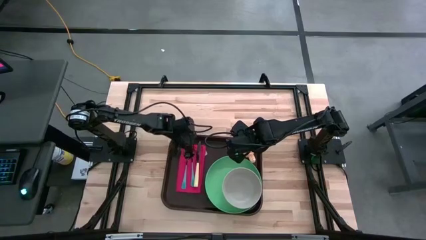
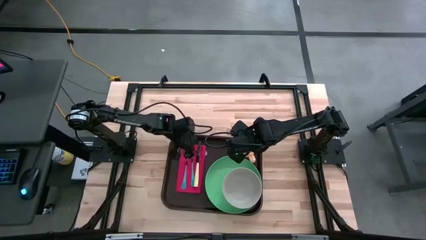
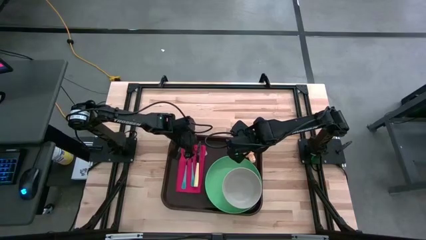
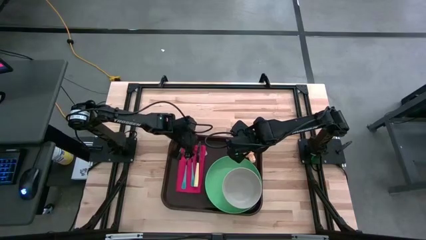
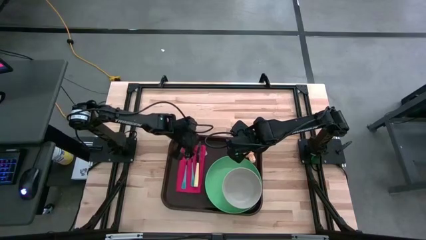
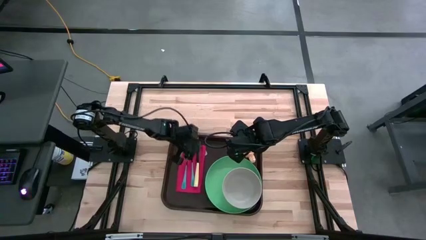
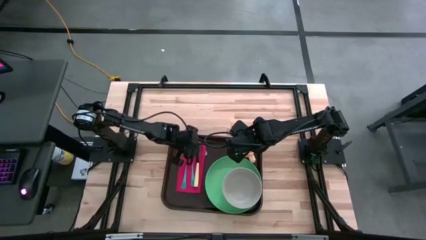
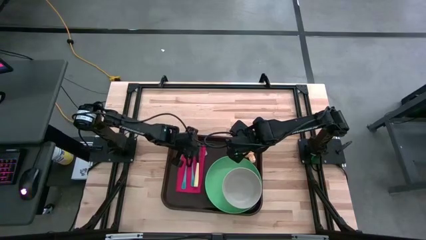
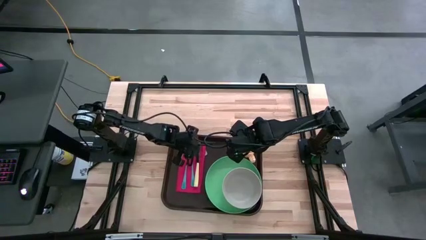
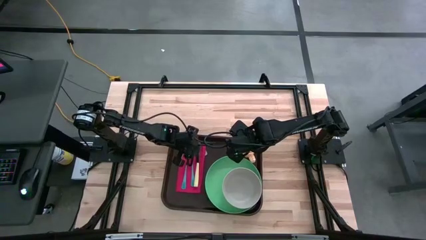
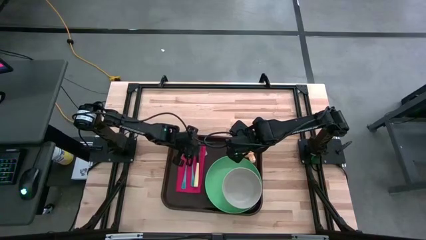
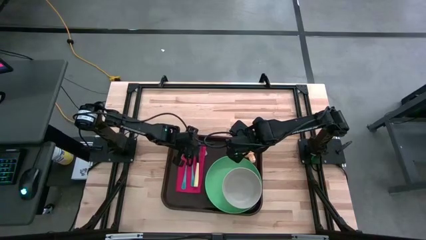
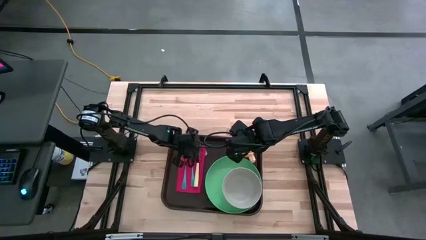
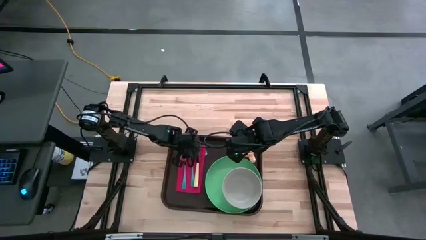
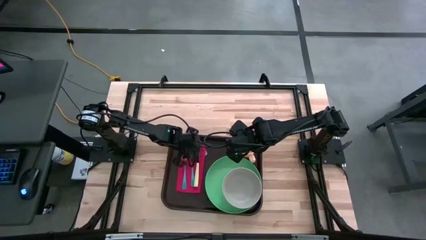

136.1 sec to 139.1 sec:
Task: Set up tray
Adjust the blue spoon on the red napkin on the brown serving tray

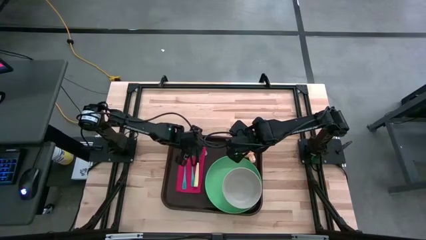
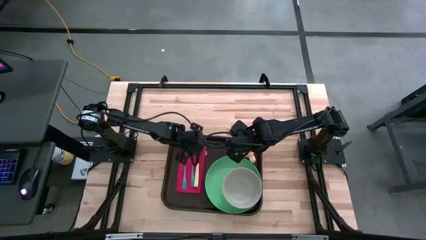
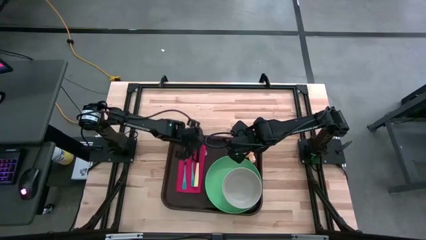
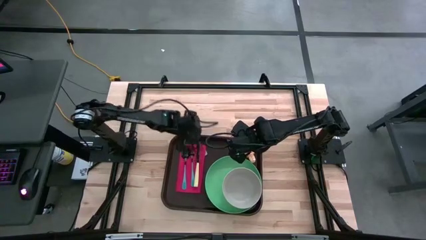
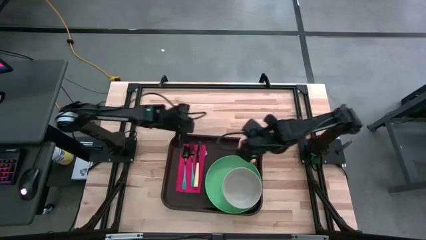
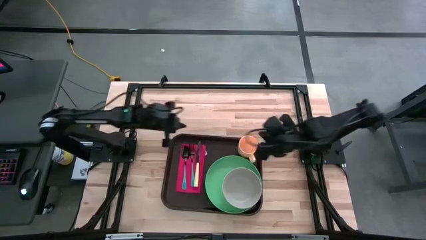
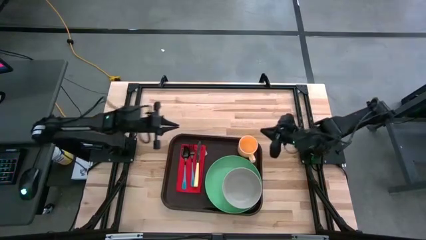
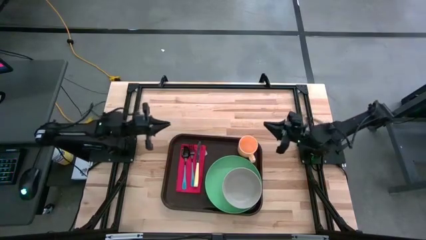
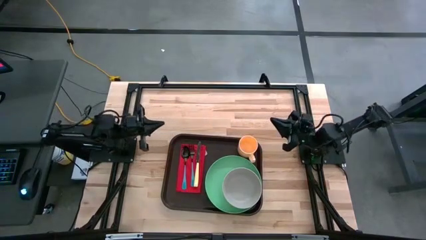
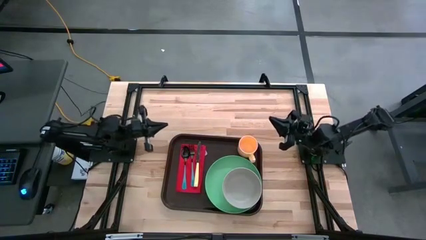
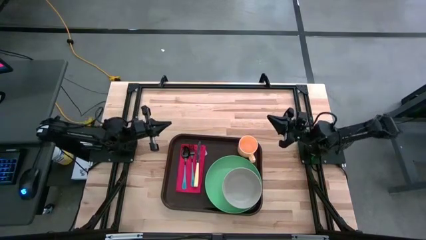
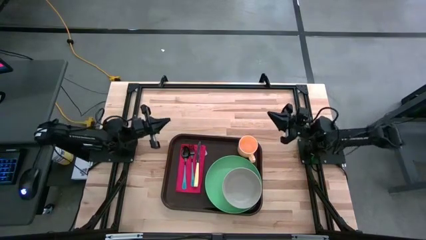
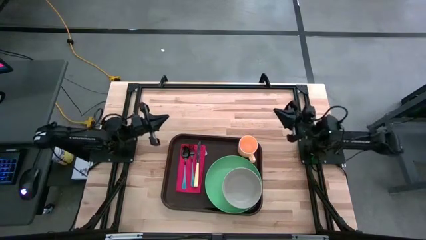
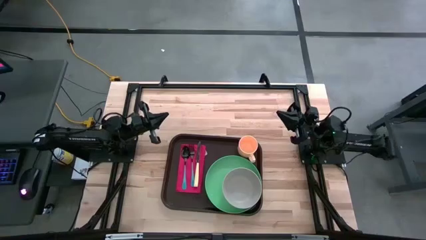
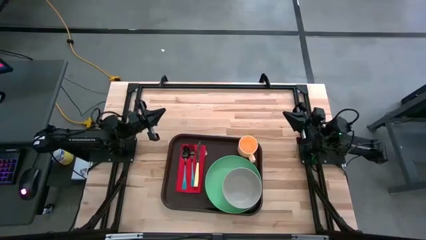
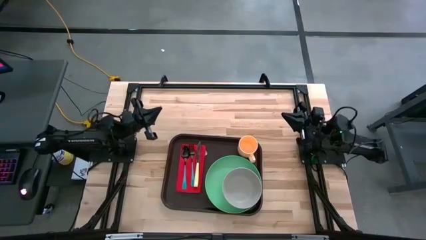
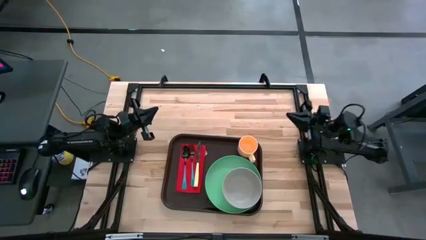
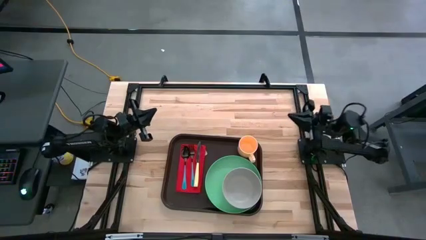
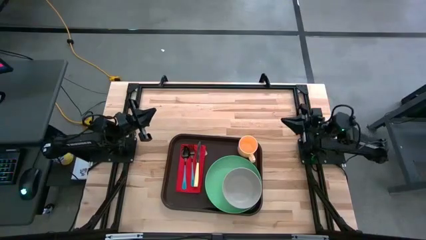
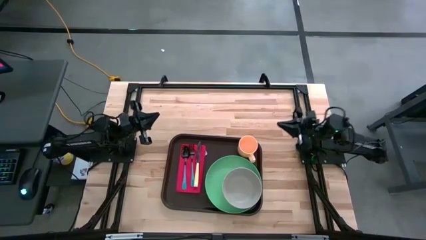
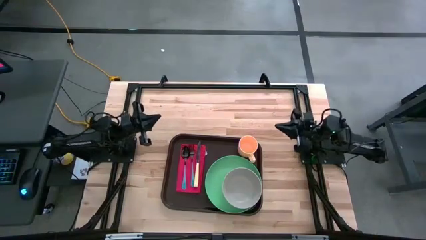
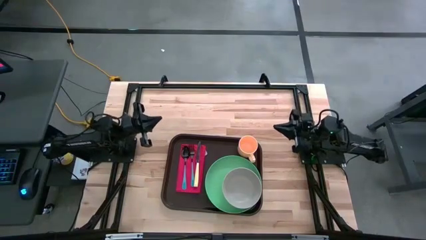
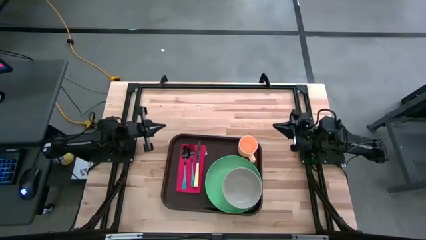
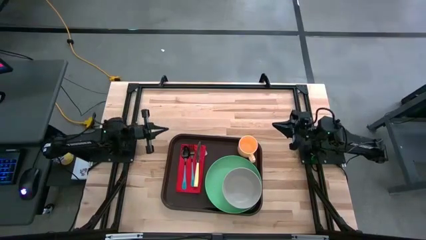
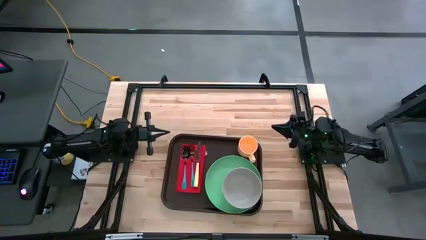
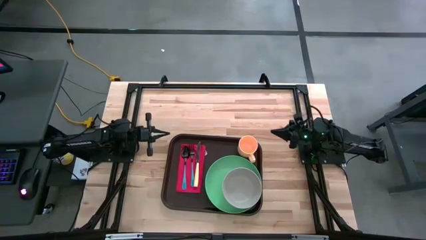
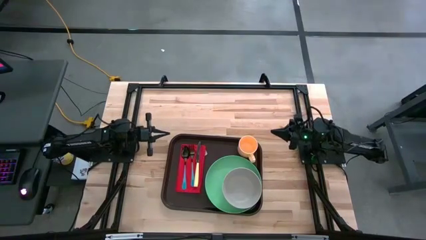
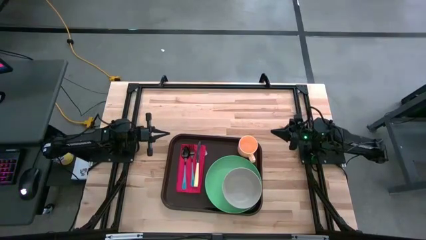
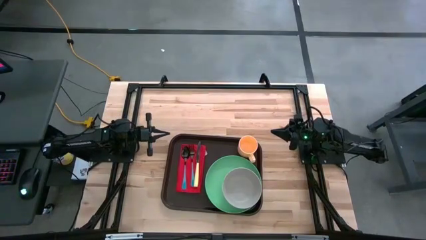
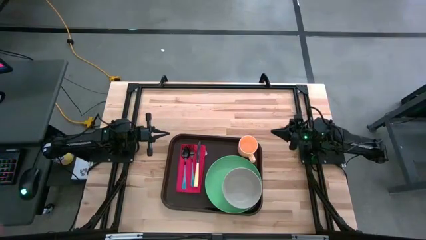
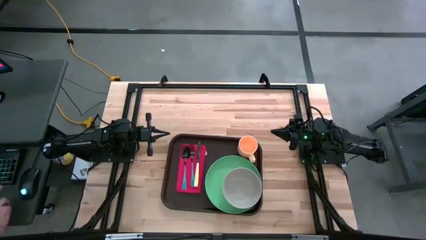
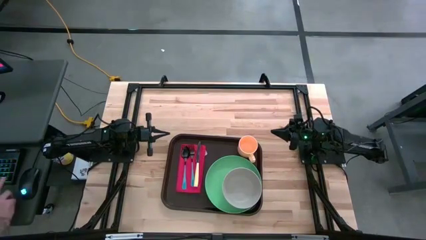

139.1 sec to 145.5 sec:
Return to Home Position

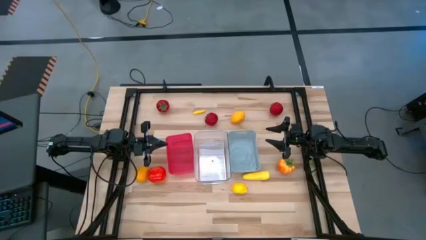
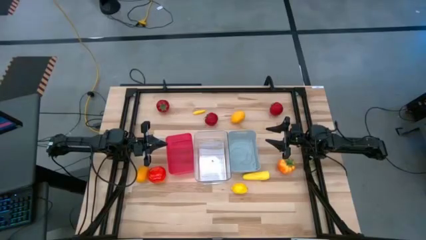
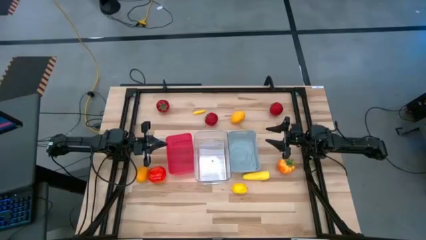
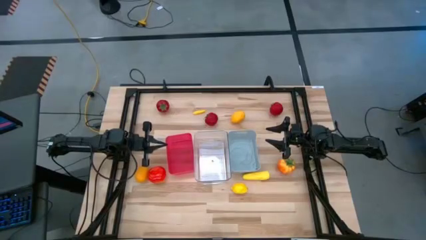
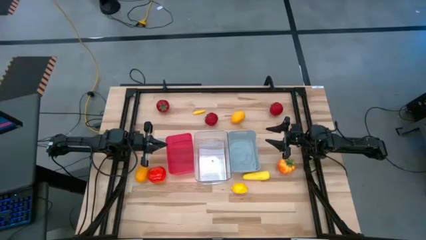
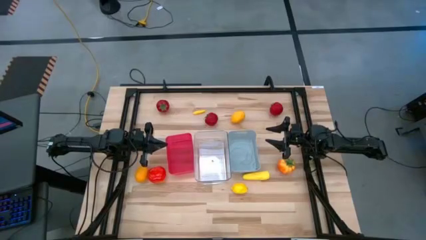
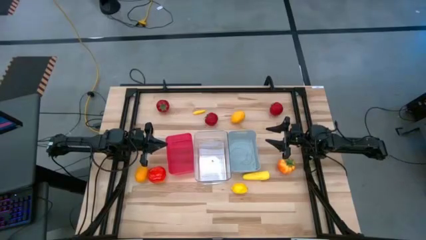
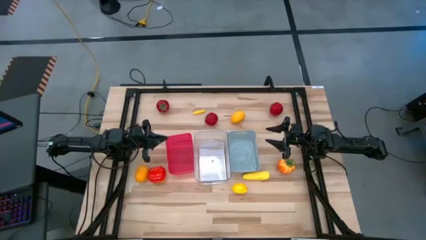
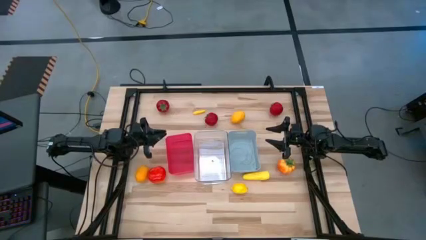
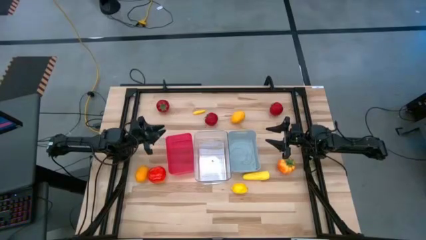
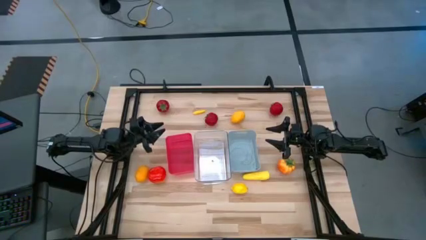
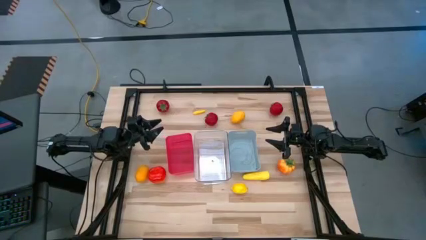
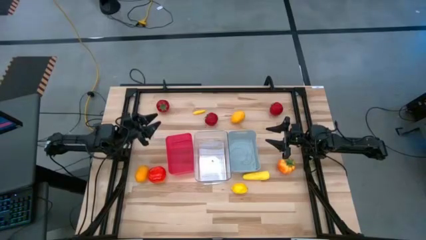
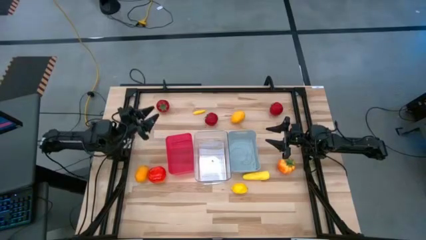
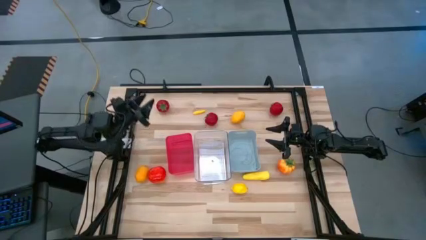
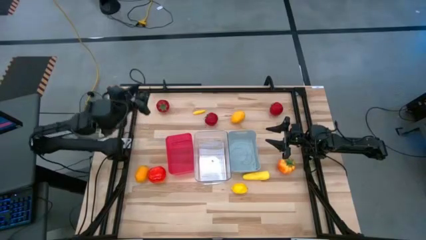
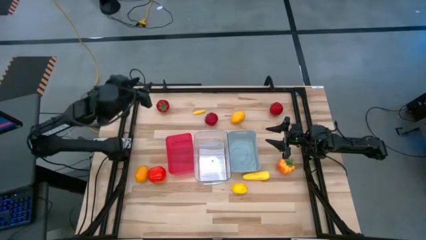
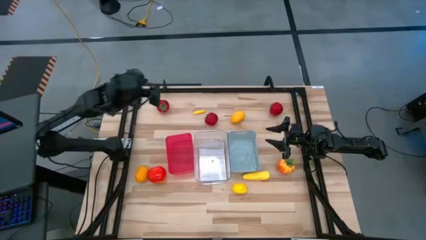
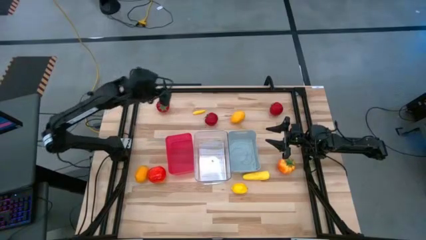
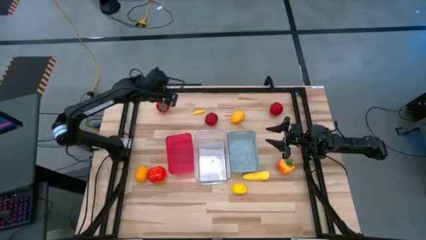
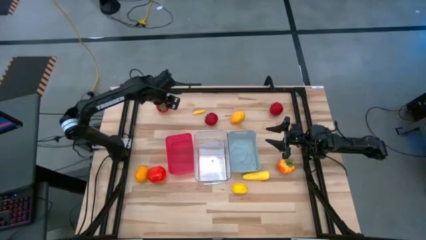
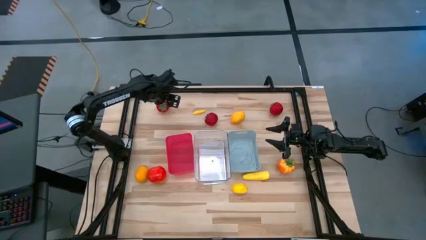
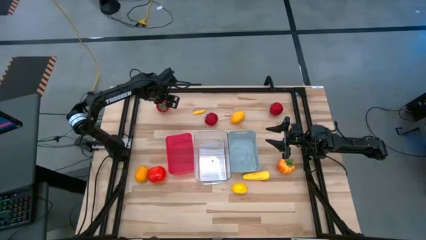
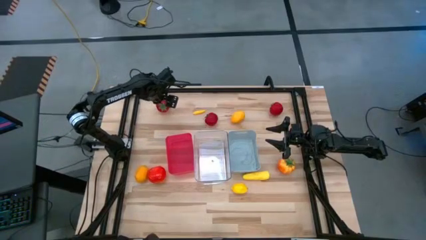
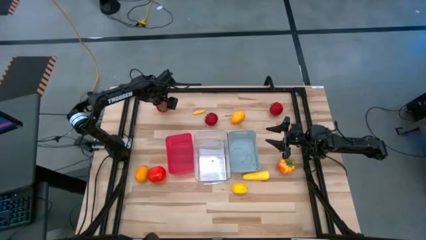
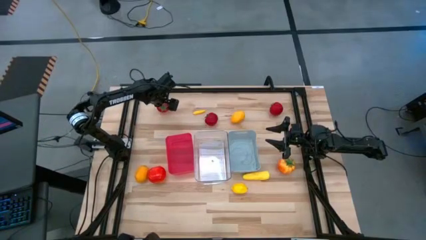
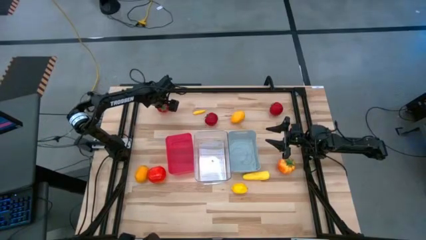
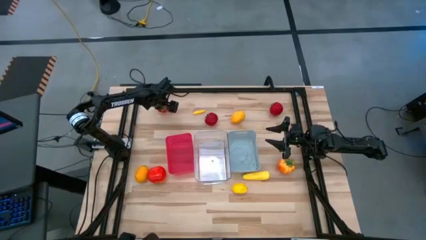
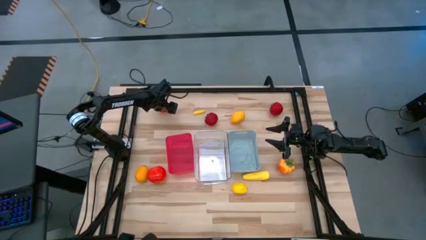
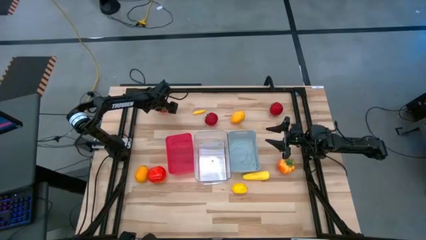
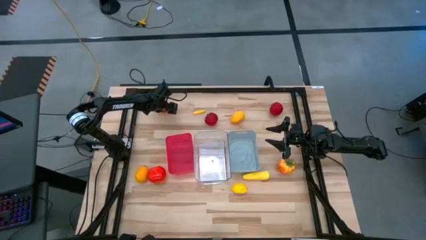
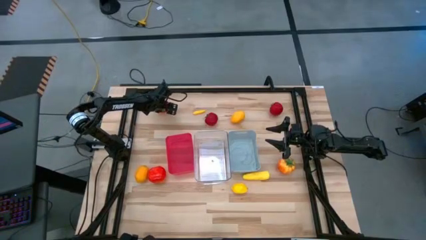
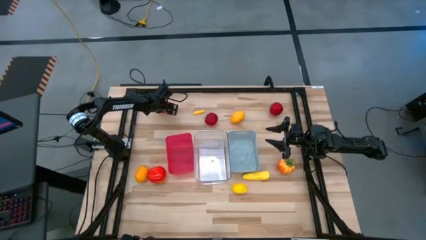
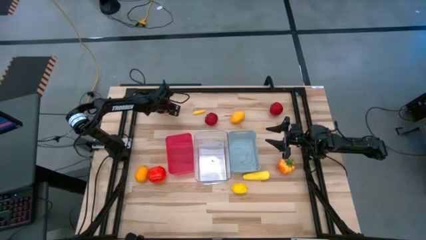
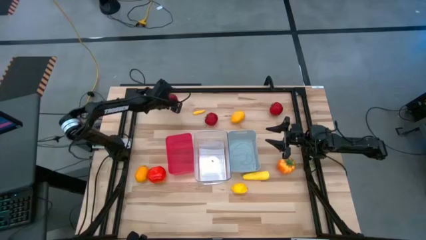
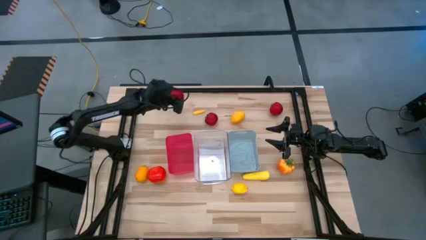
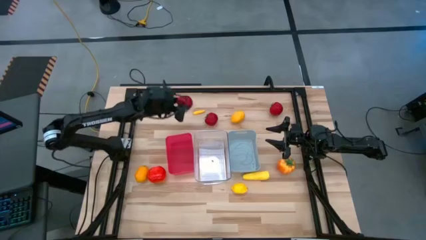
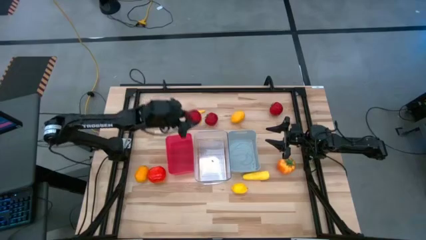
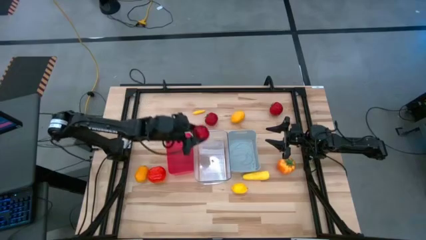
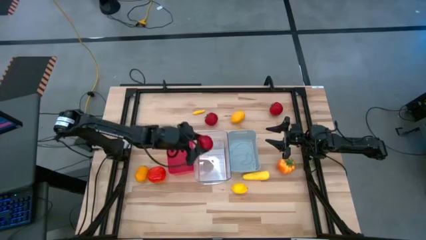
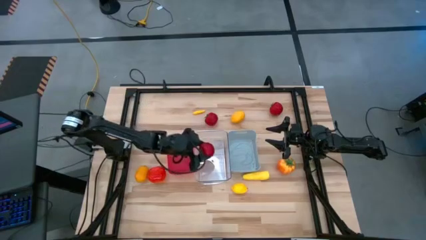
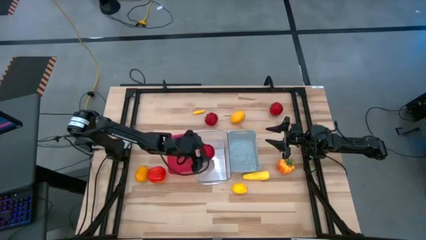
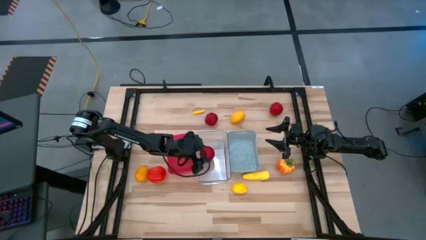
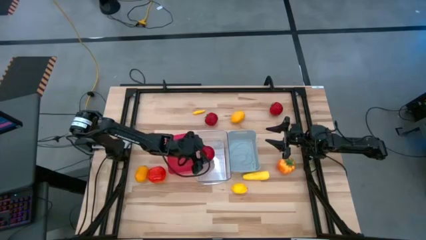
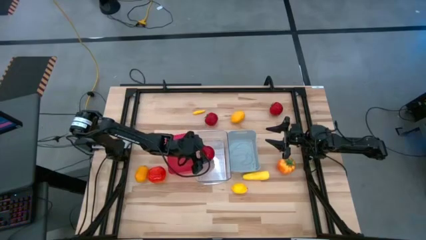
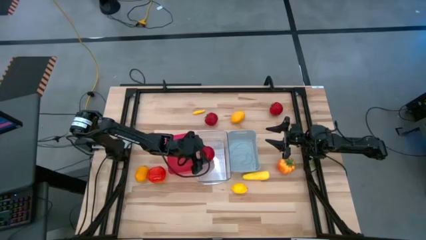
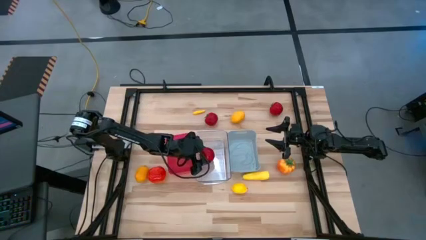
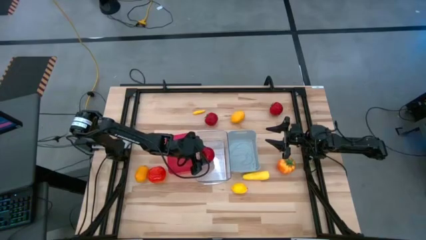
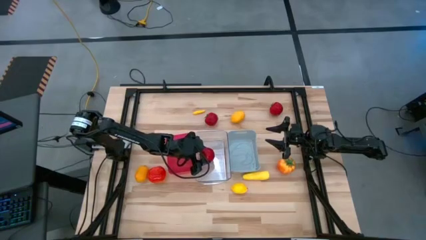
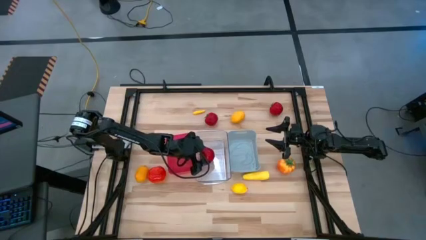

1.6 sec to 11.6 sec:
Task: Sort produce into baskets
Put the left red tomato into the transparent bin
